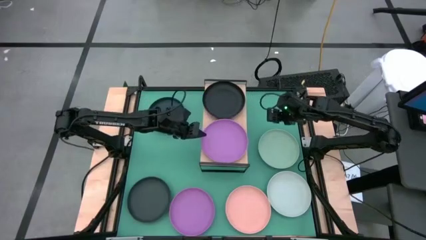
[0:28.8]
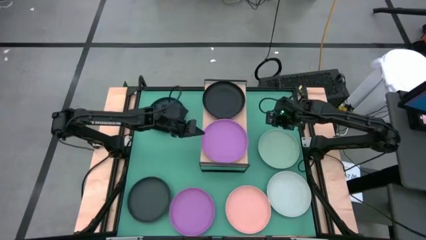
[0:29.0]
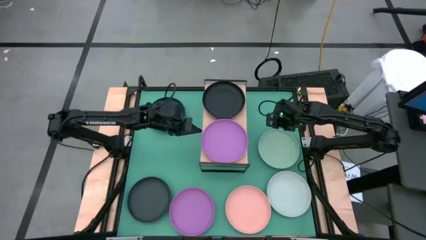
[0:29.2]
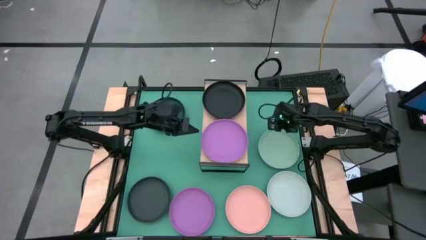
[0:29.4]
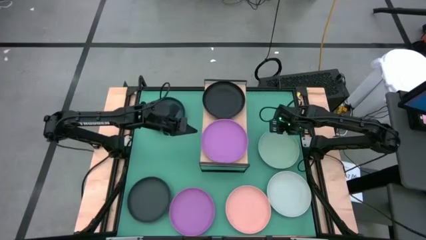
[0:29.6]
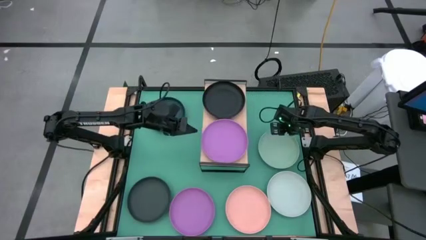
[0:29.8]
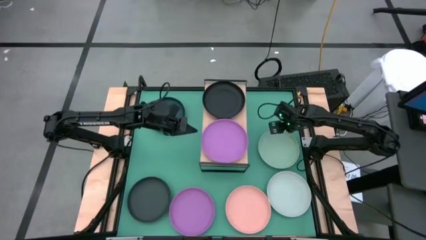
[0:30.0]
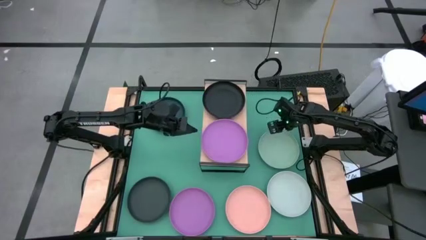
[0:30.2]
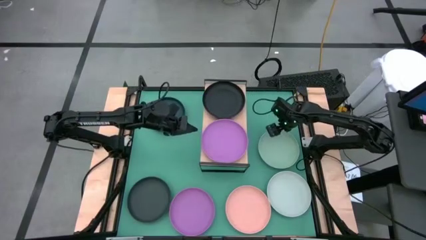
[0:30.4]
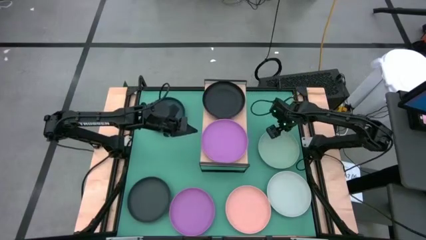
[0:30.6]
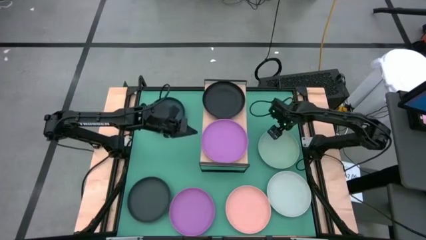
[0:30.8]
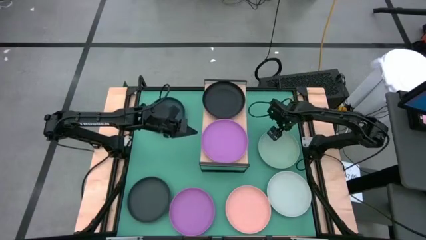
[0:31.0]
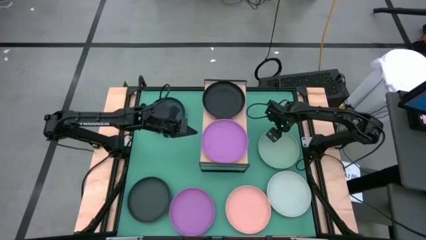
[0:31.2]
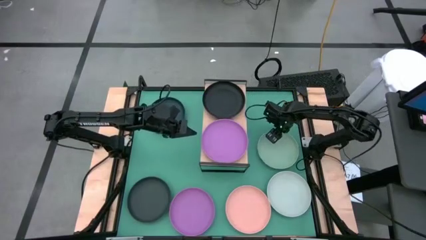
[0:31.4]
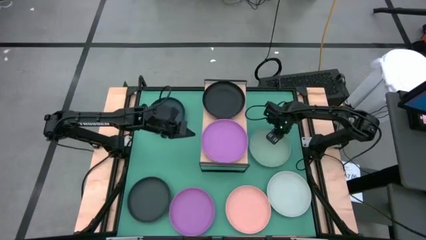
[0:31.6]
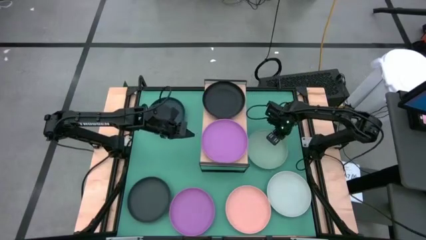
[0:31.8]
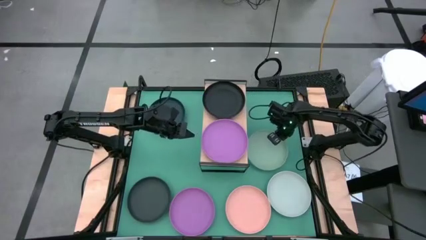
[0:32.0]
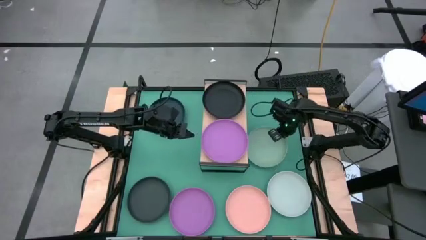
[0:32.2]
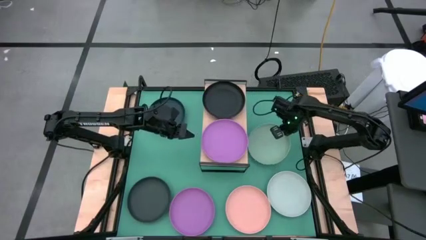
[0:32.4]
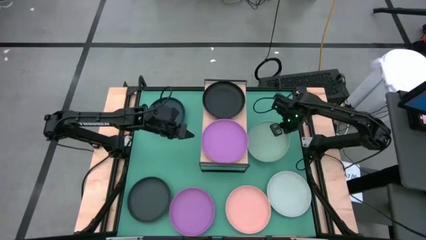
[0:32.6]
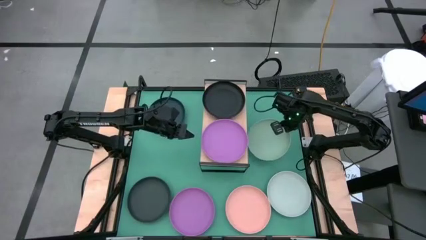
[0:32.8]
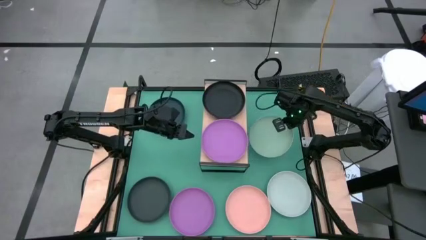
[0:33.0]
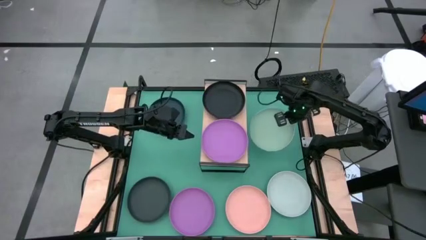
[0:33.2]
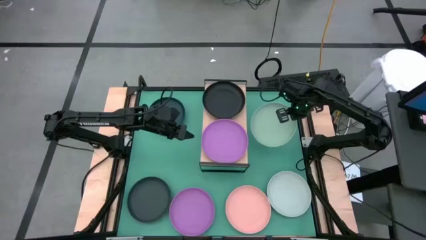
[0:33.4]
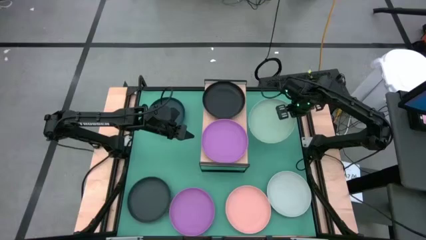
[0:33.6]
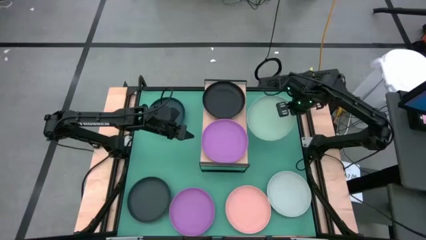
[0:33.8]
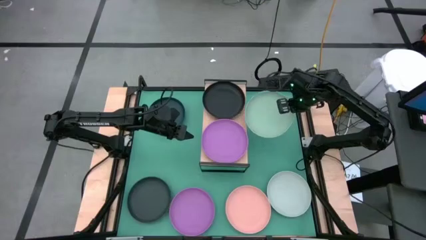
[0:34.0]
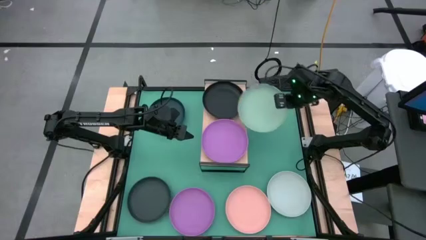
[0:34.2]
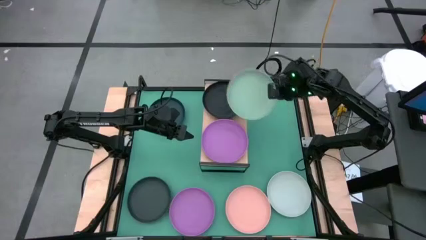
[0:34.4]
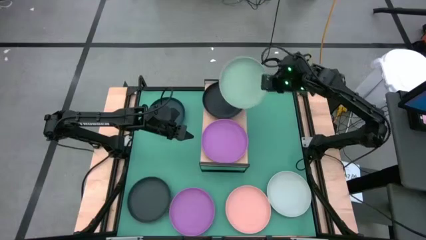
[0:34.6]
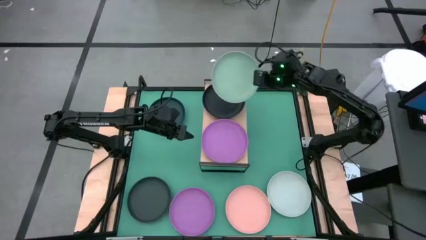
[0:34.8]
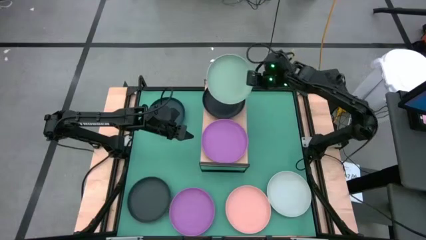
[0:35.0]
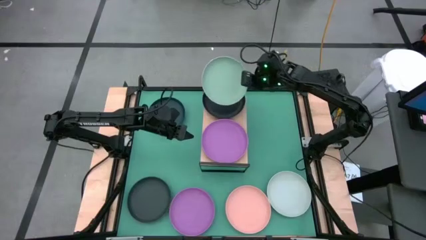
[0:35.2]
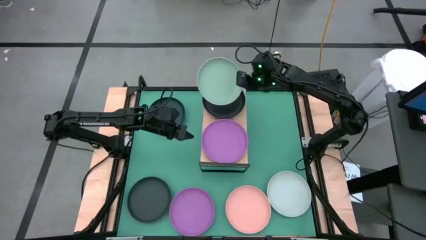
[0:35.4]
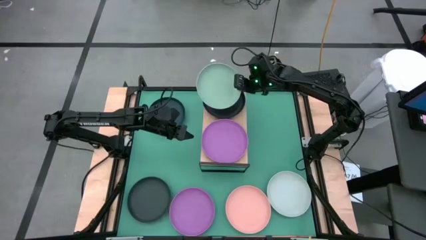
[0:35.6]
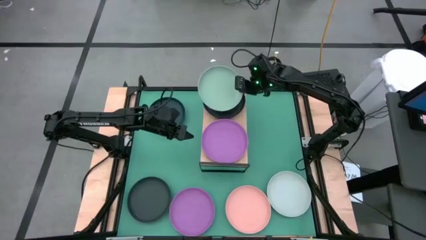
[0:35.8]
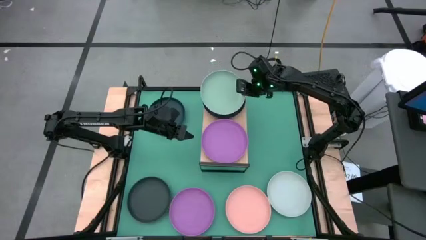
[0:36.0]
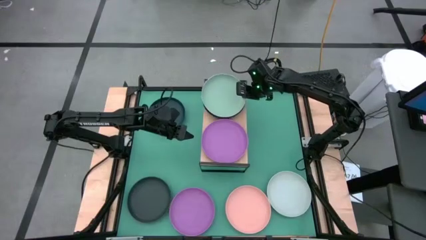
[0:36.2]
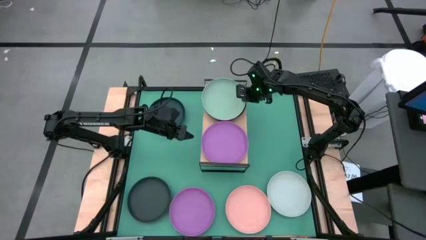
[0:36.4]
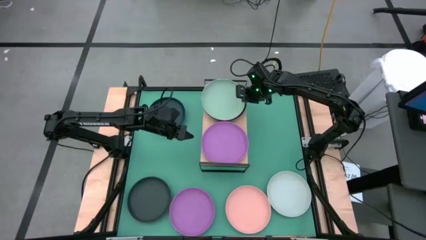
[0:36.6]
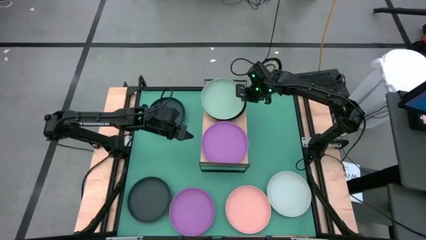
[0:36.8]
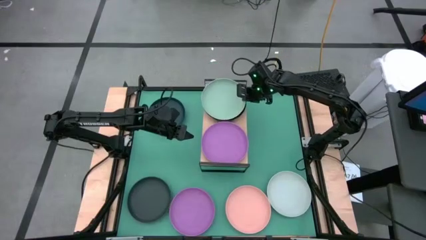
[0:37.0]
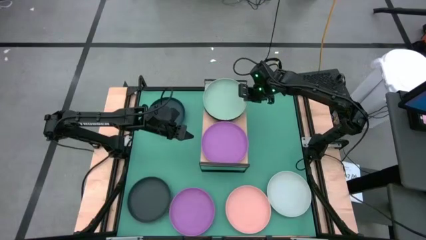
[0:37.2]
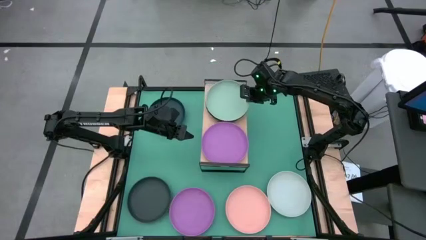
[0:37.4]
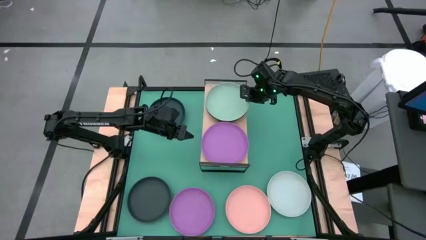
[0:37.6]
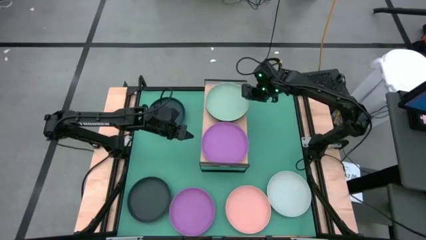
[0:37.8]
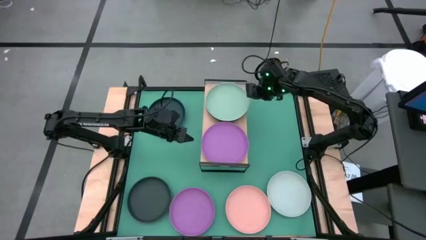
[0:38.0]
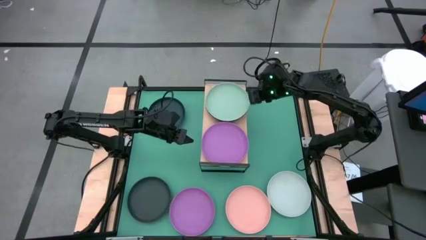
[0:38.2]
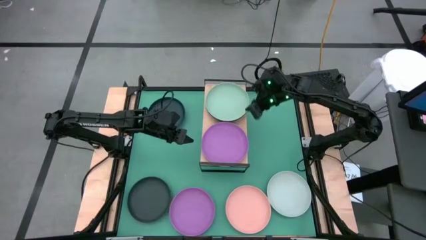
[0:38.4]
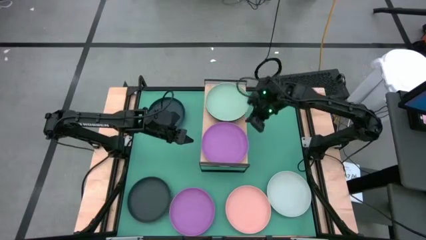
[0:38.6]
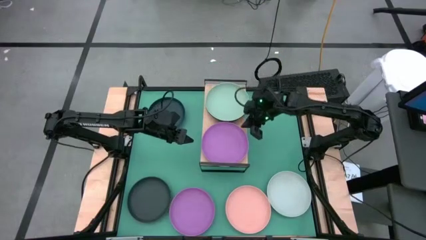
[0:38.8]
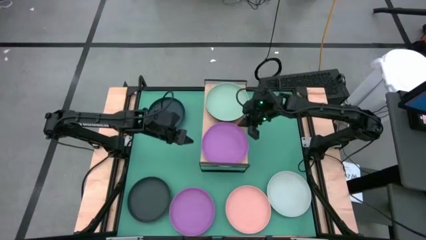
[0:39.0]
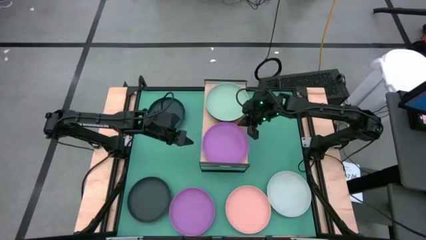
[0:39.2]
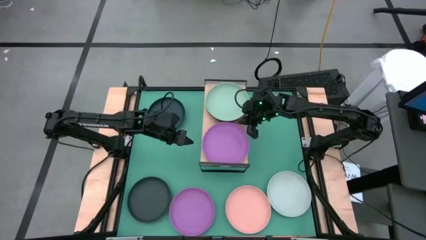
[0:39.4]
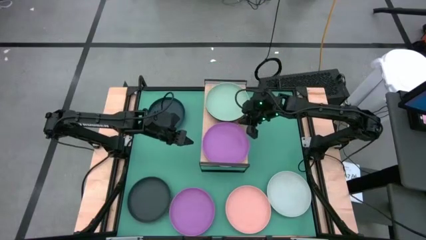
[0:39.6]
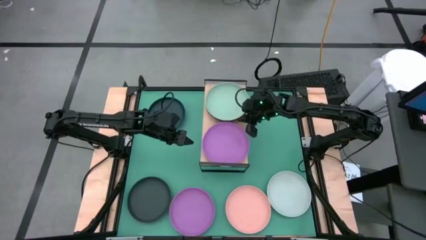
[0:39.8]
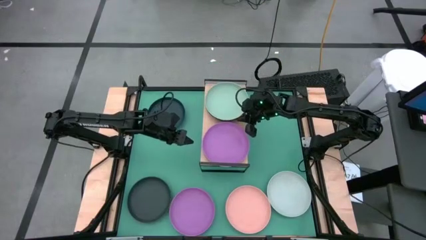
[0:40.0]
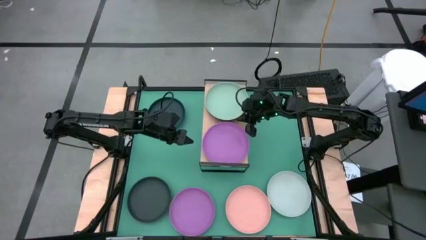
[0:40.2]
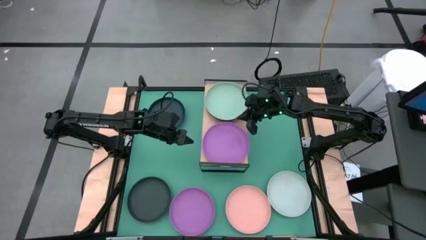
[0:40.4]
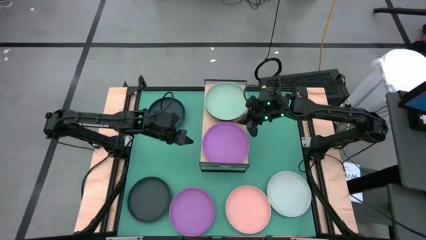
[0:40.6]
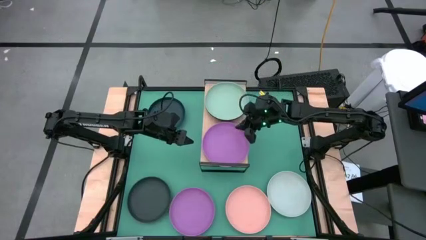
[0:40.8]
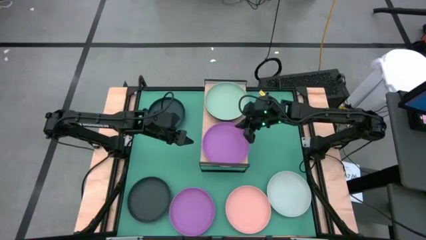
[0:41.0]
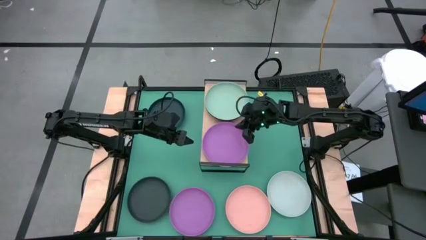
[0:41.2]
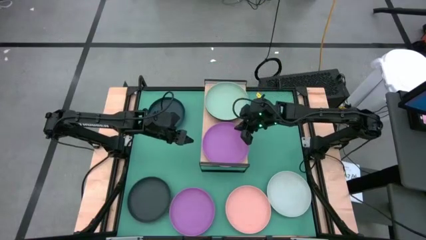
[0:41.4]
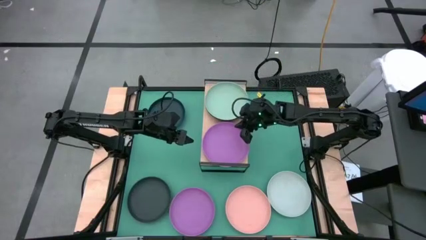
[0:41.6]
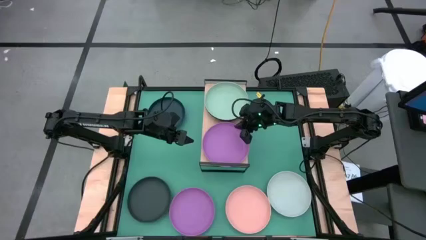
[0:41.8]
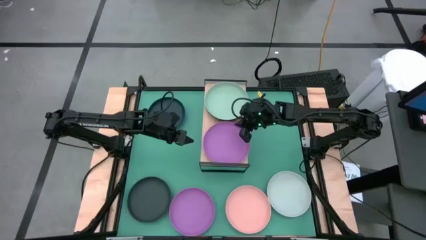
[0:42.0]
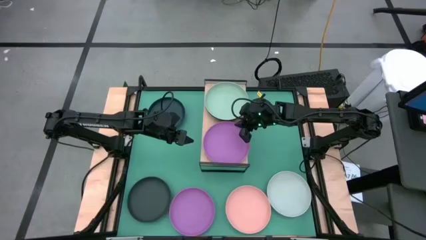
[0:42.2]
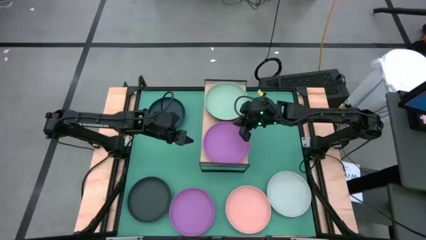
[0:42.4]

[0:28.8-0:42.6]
Task: Place and stack plates onto a shelf
Stack the light green plate on top of the black plate
